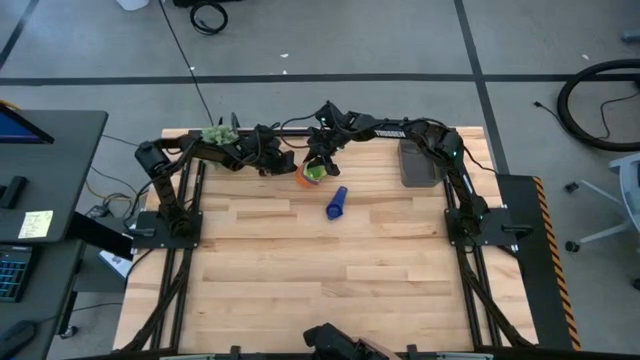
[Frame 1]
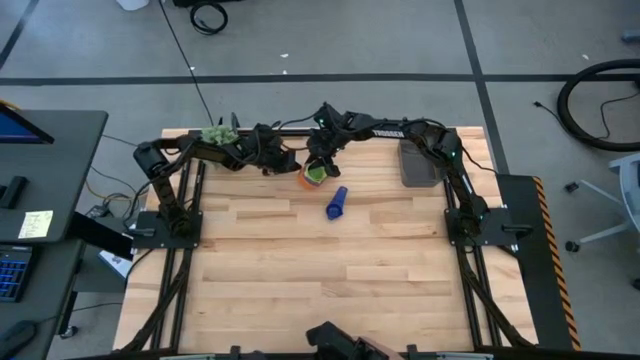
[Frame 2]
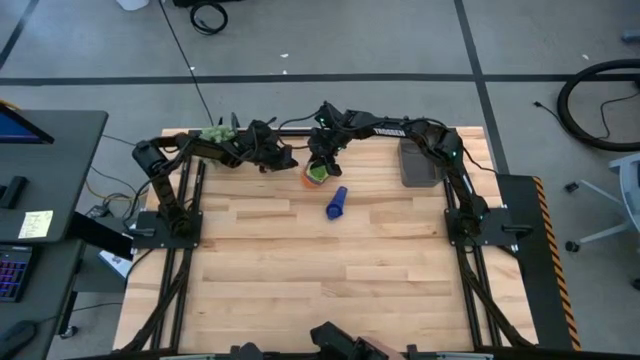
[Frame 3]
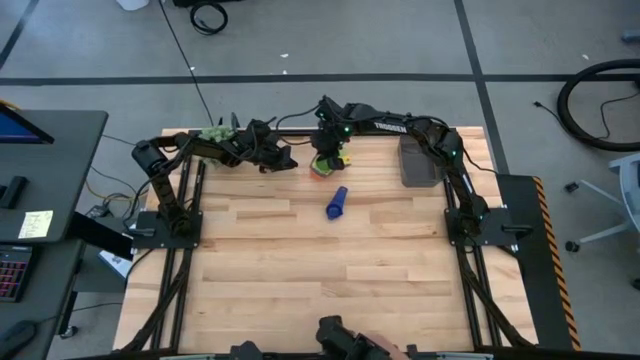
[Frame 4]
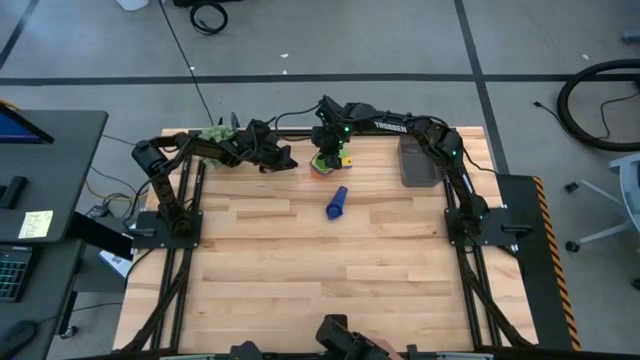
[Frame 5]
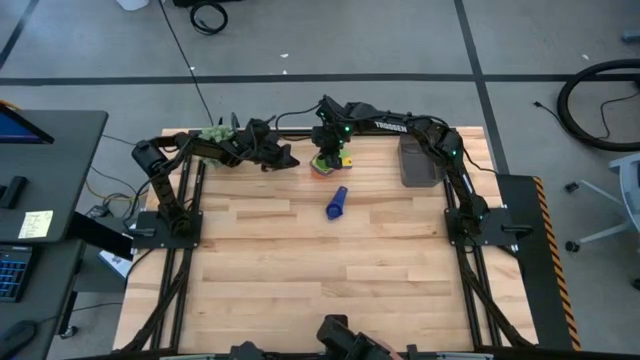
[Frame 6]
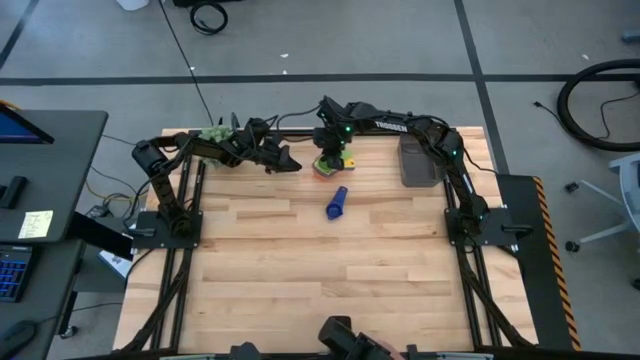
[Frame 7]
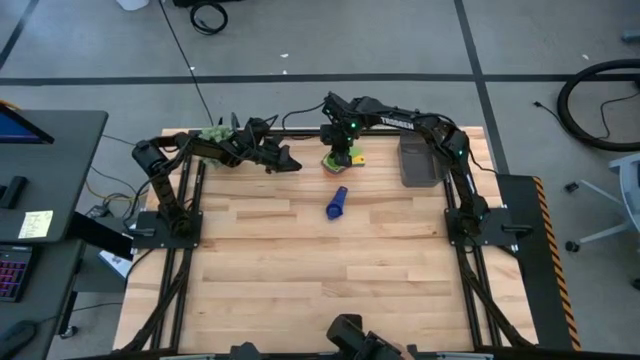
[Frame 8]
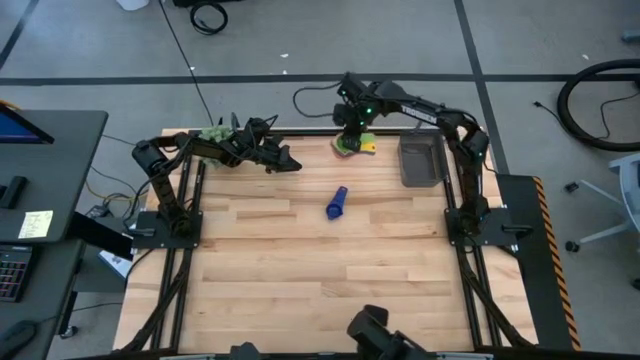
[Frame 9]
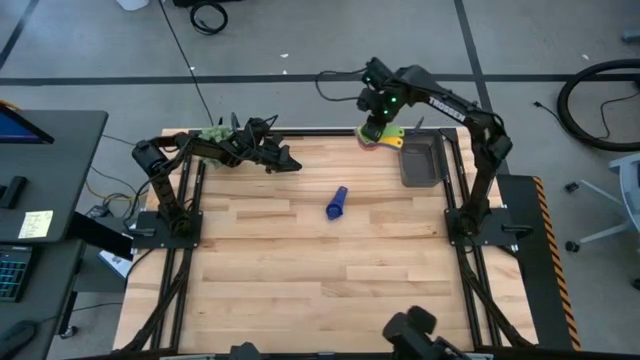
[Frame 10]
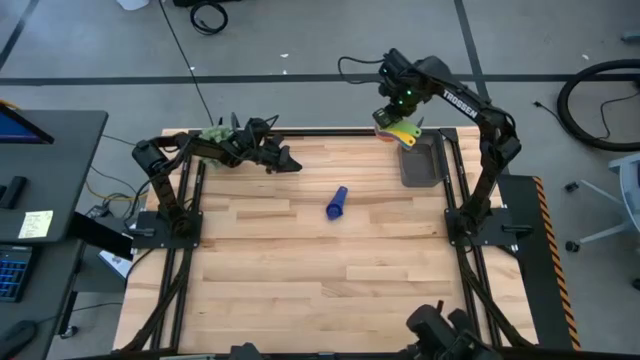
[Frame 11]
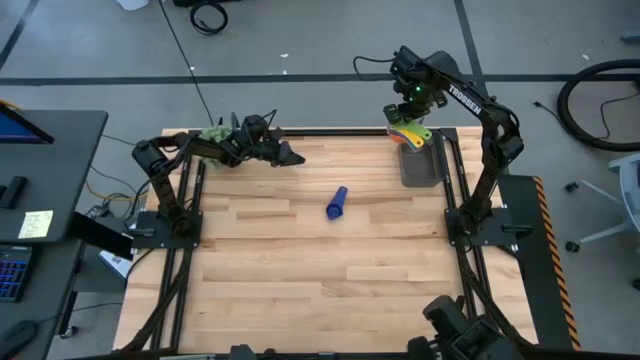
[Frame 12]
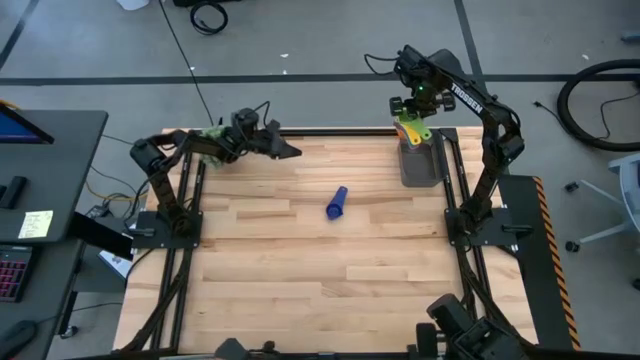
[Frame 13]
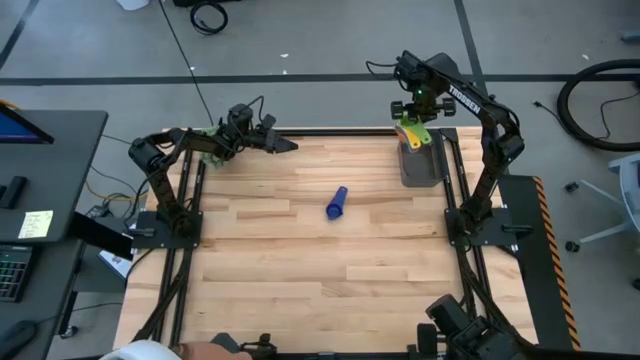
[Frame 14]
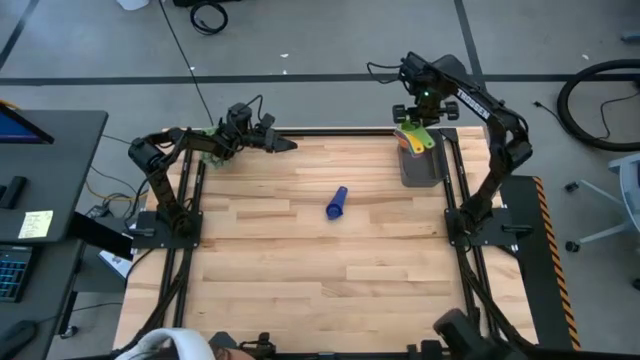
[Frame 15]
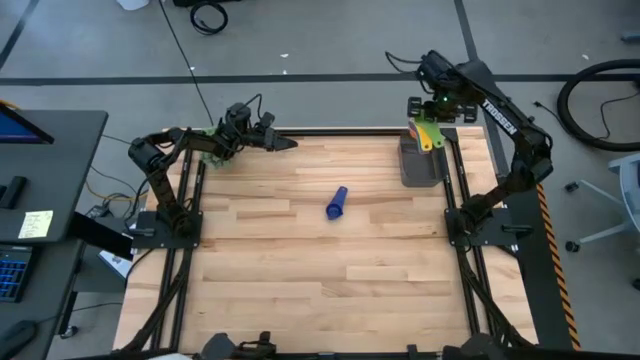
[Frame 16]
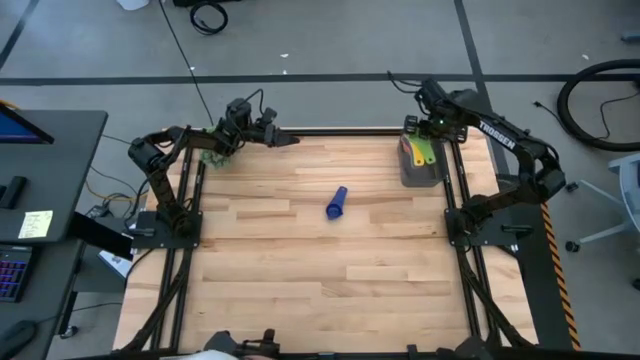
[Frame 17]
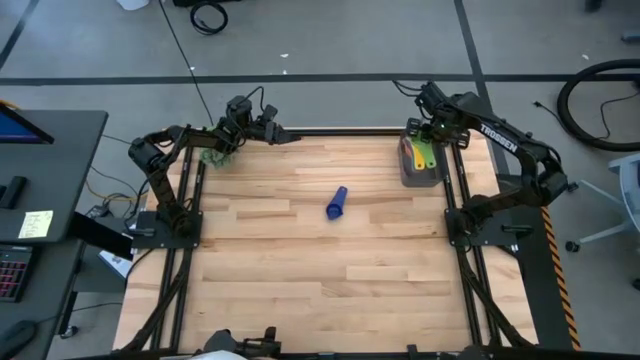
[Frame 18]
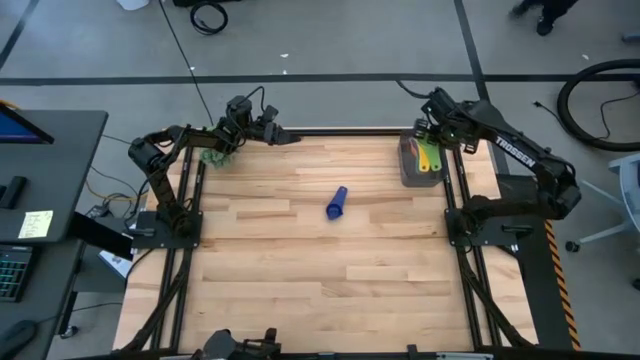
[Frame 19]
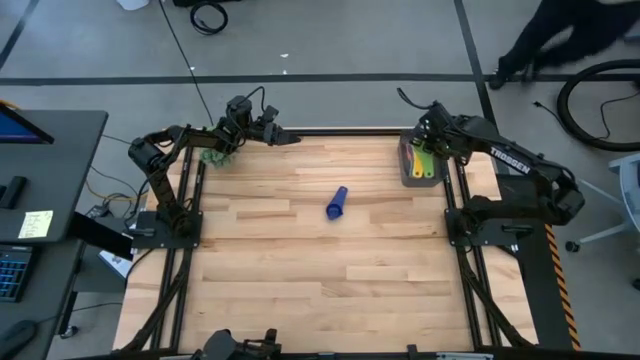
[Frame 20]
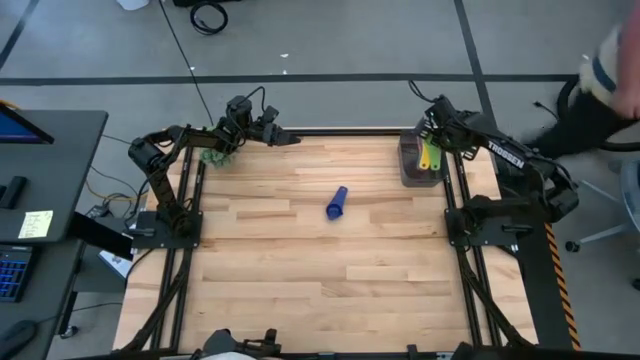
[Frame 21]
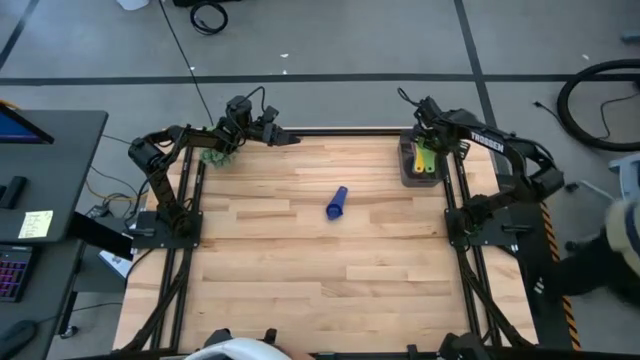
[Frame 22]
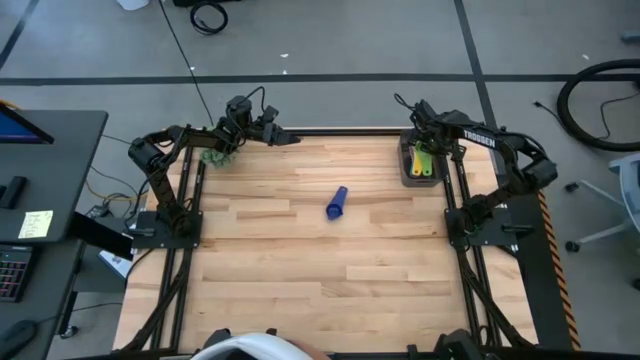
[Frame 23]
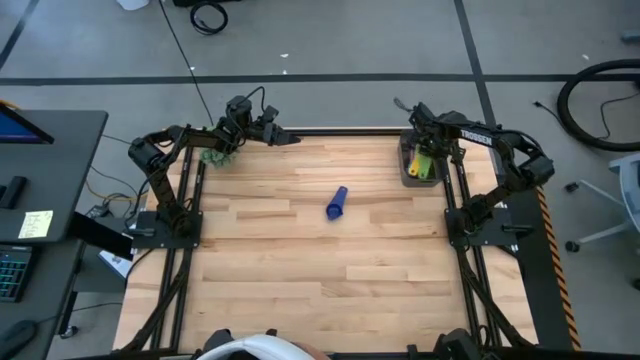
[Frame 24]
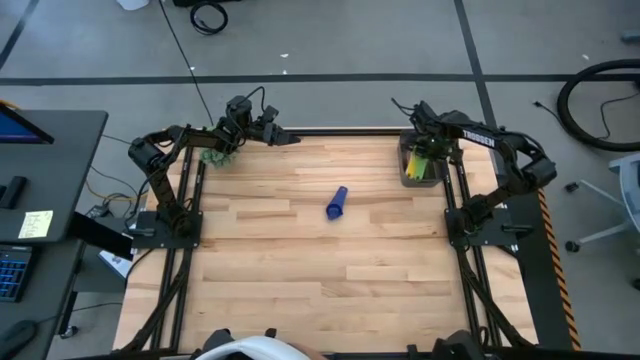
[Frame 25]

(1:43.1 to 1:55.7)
Task: Nest measuring cups in basket
Put the stack of measuring cups into the black bin

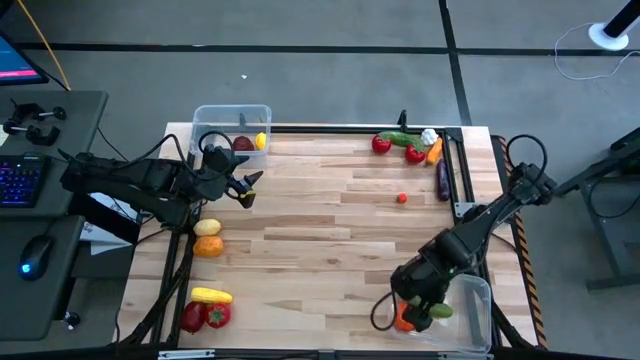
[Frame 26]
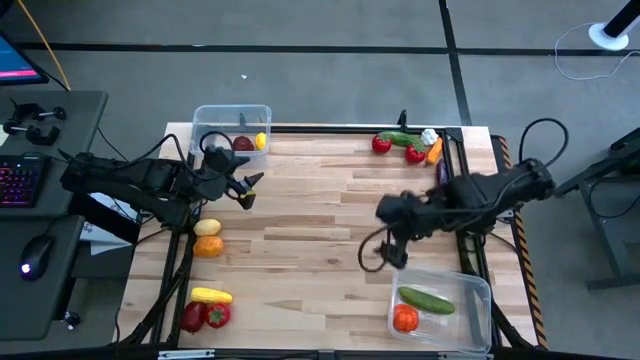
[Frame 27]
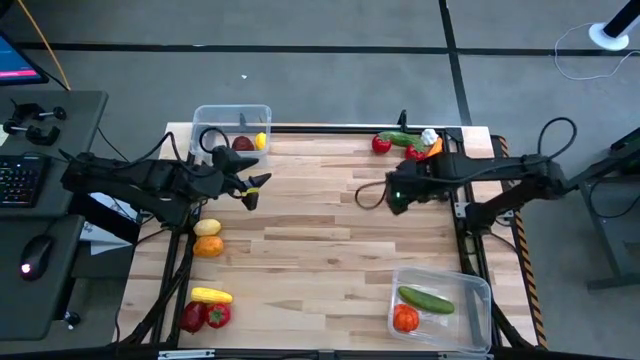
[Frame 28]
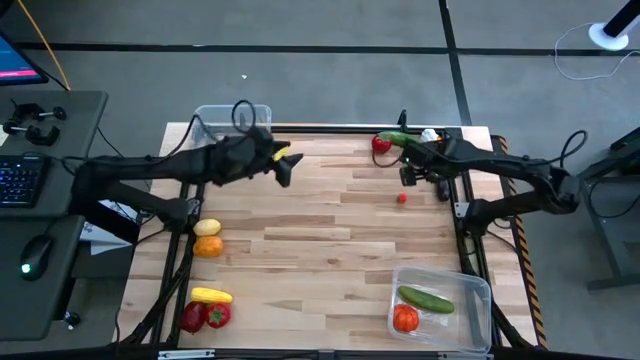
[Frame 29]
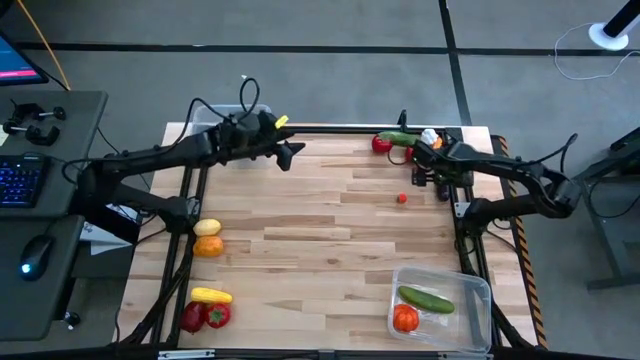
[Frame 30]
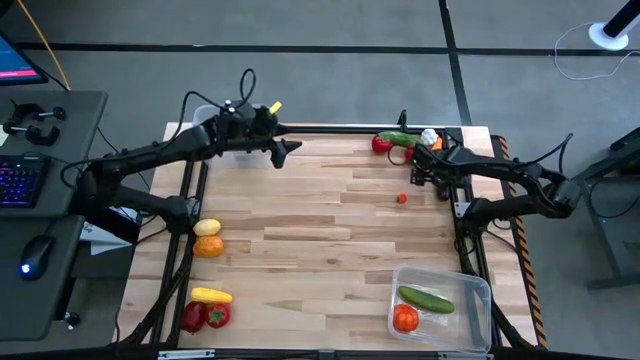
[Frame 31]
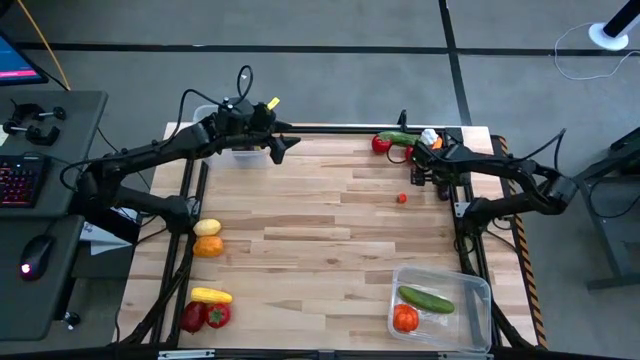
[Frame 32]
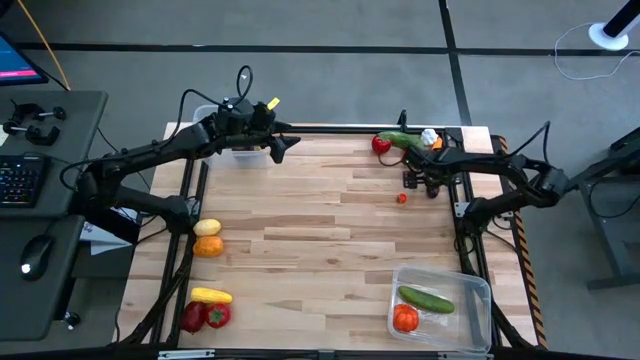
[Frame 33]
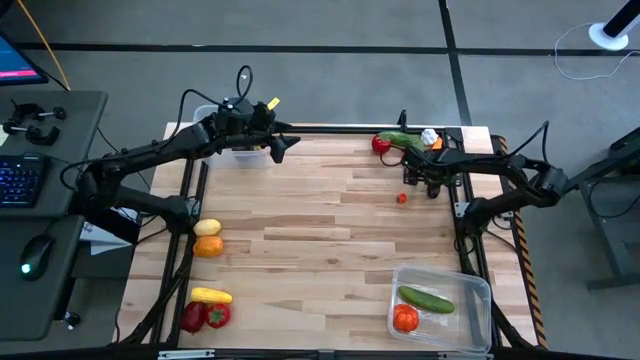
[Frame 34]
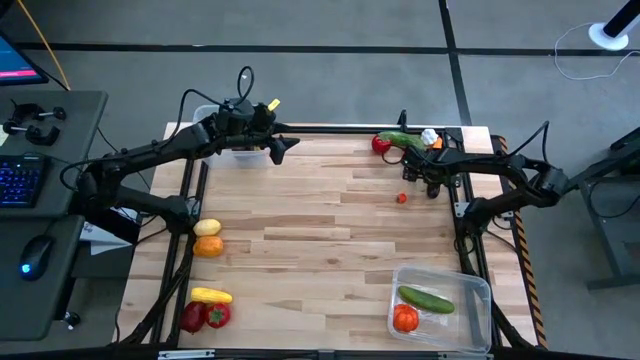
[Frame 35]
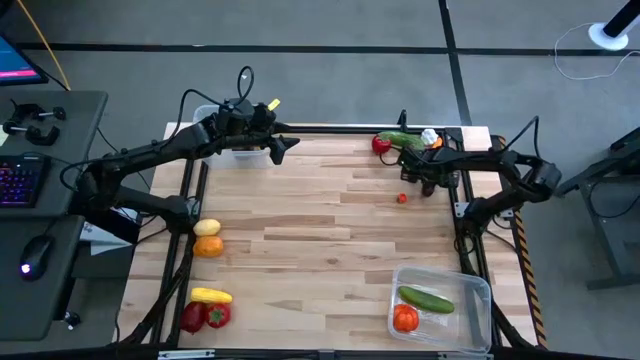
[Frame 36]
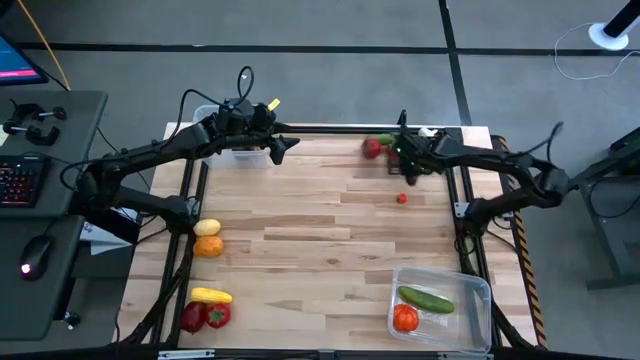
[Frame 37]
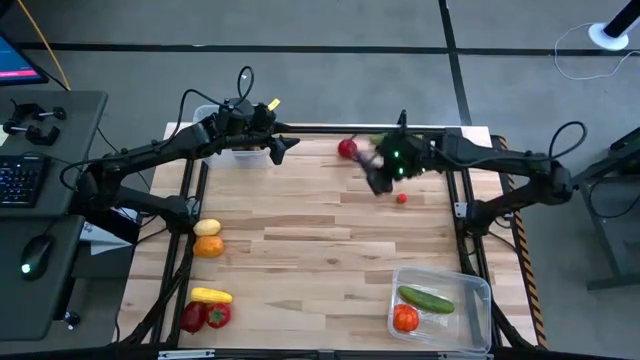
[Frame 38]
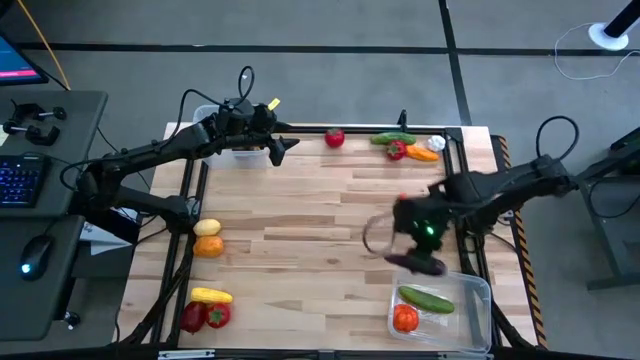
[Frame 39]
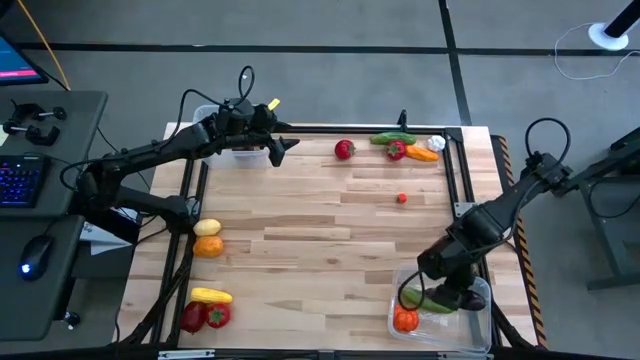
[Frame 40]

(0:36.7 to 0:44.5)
Task: Sort produce into baskets
Put the violet eggplant into the bottom transparent bin

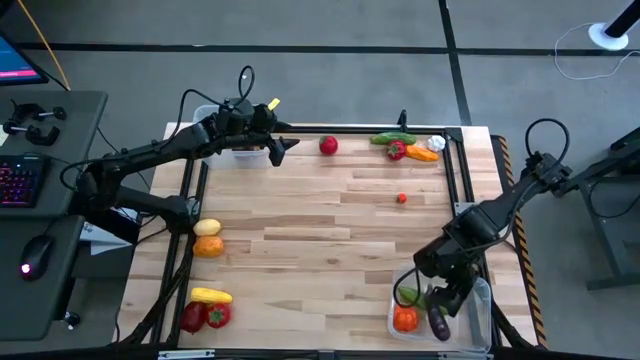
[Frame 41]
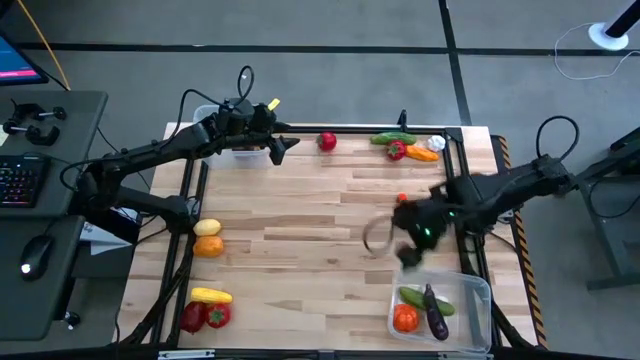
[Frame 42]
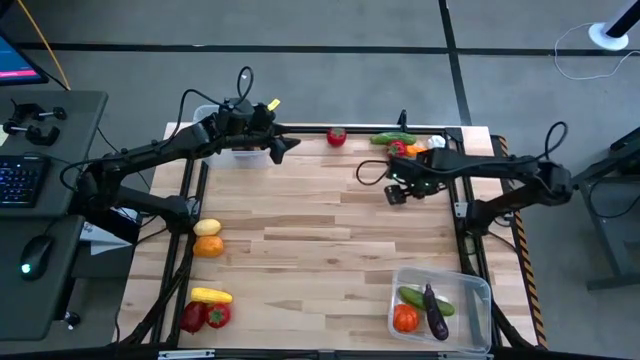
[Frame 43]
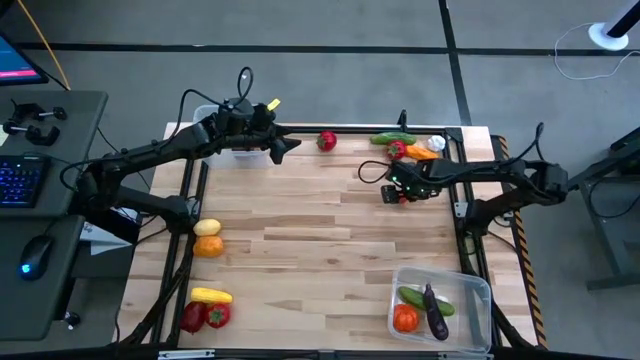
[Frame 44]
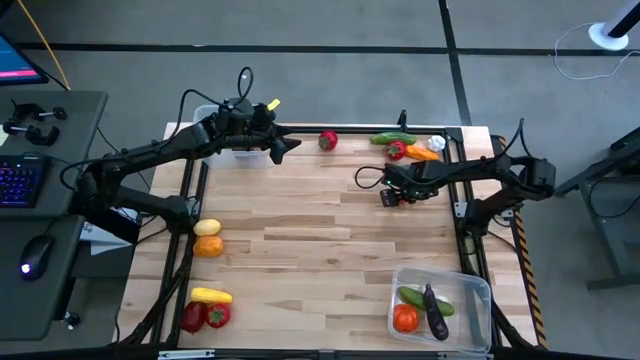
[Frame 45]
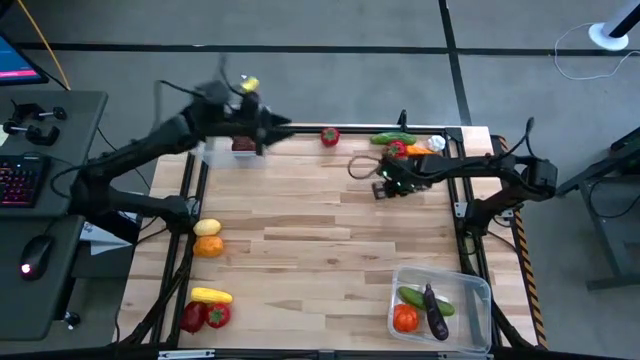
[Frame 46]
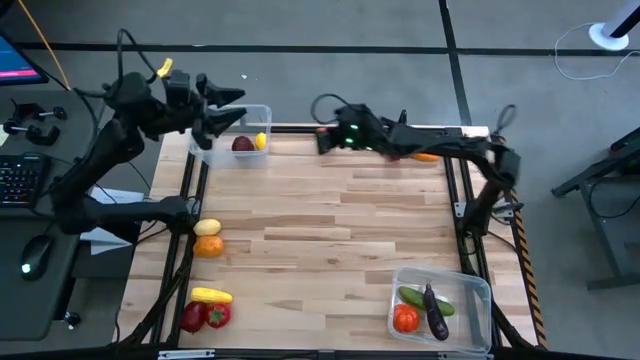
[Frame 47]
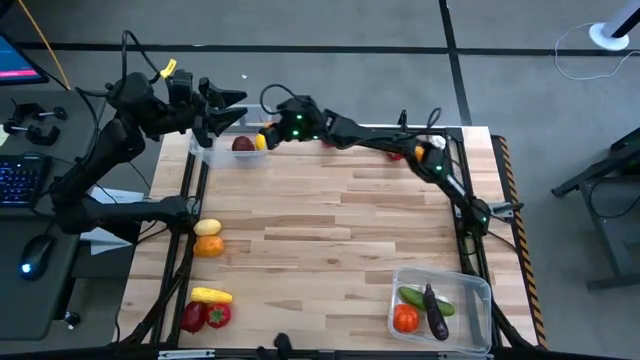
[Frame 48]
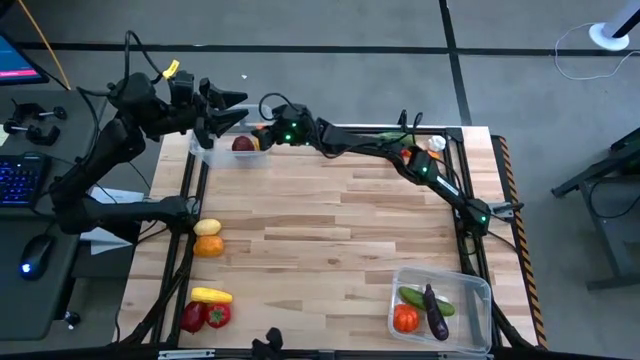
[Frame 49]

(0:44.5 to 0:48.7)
Put the orange tomato into the top transparent bin
